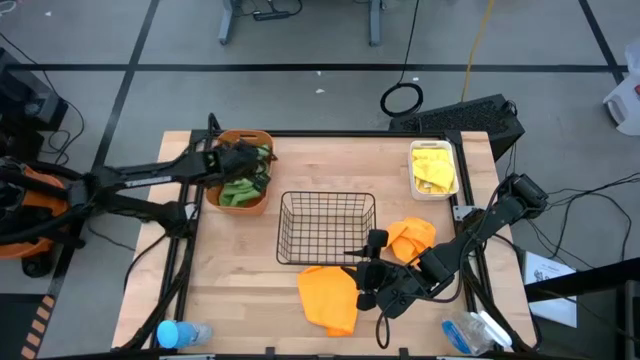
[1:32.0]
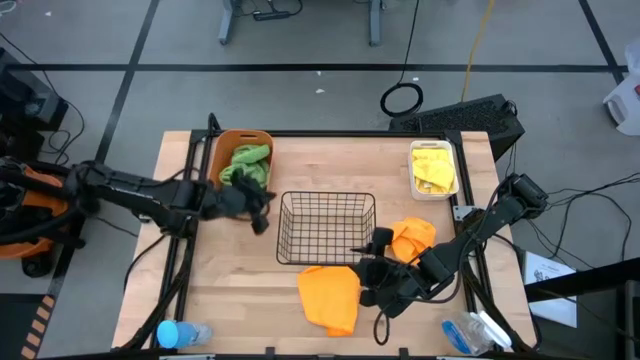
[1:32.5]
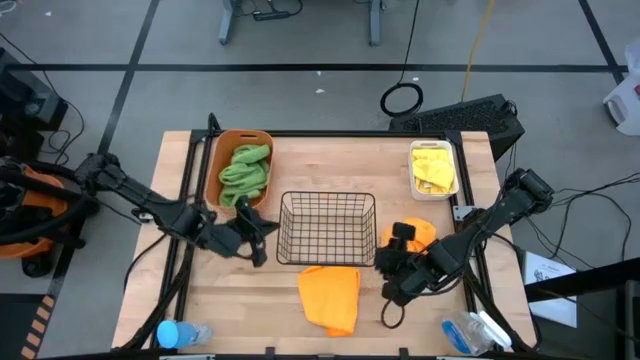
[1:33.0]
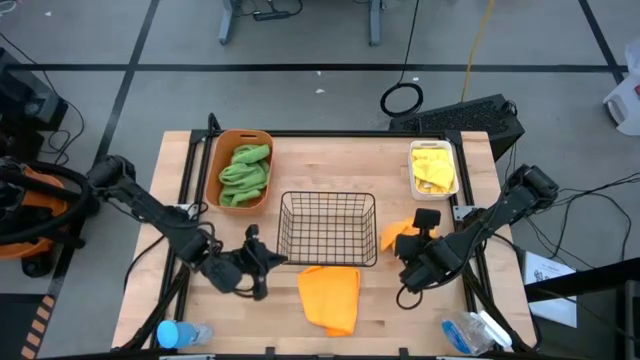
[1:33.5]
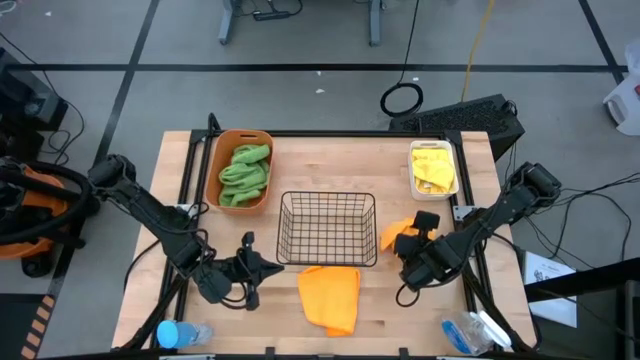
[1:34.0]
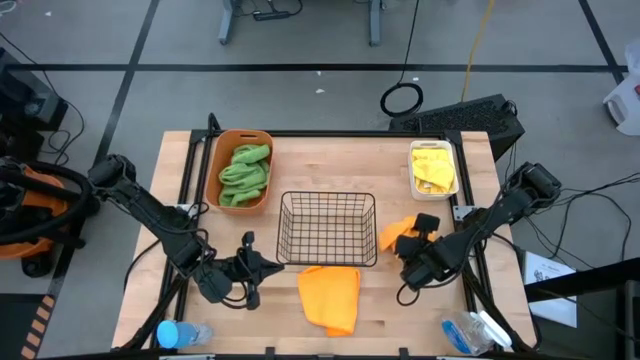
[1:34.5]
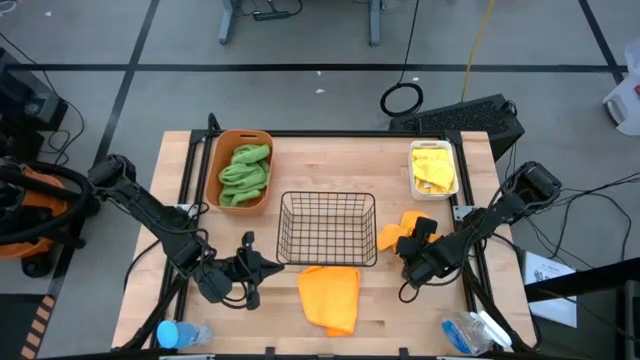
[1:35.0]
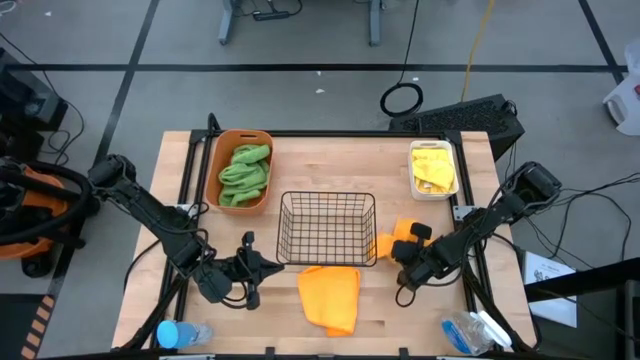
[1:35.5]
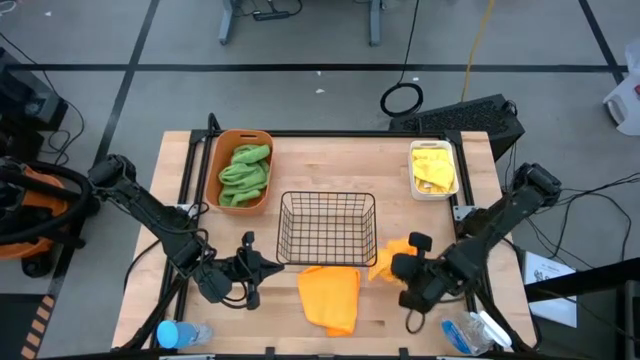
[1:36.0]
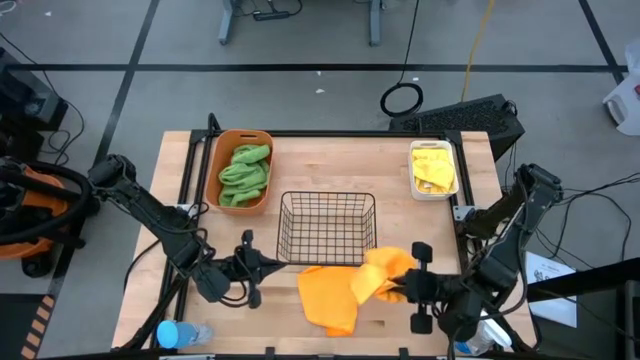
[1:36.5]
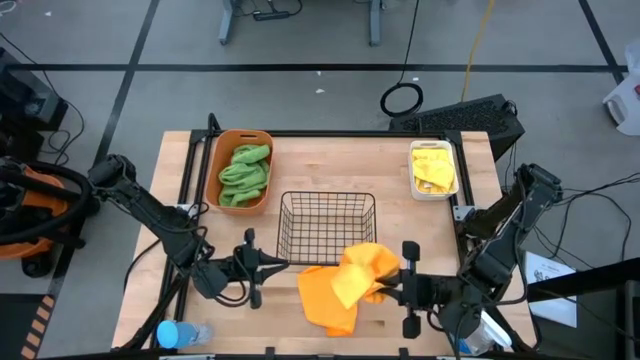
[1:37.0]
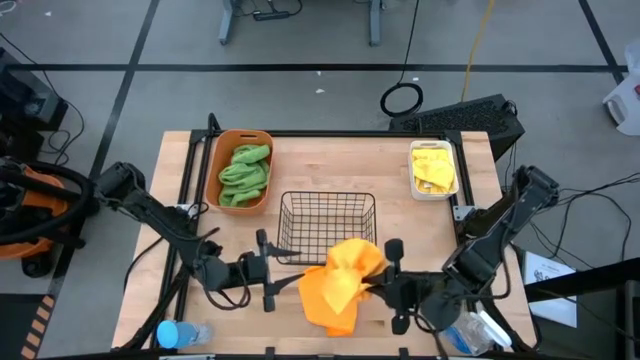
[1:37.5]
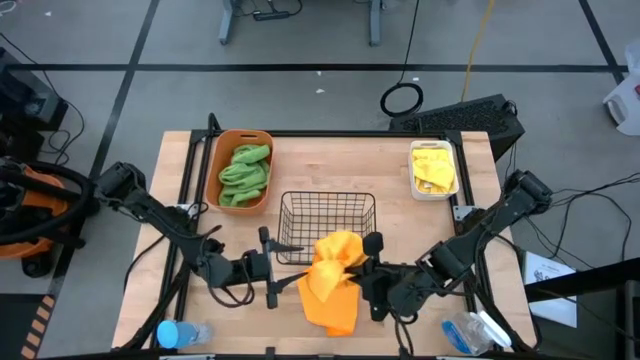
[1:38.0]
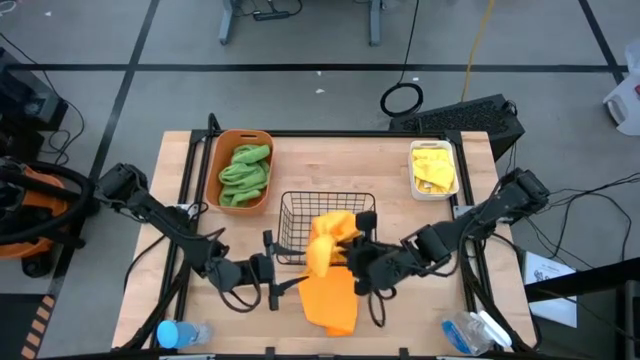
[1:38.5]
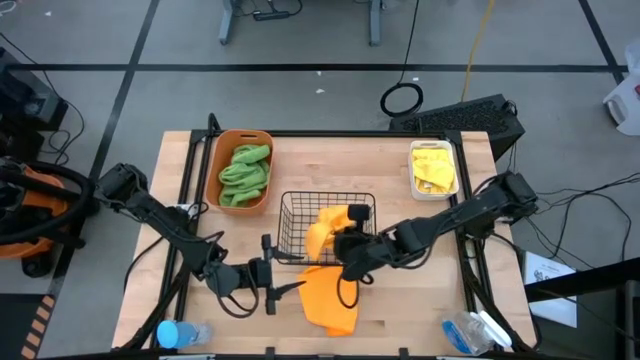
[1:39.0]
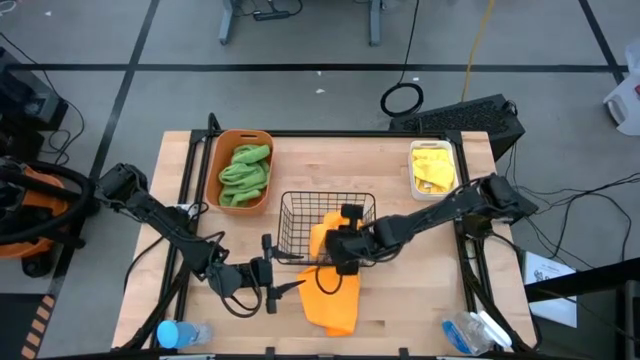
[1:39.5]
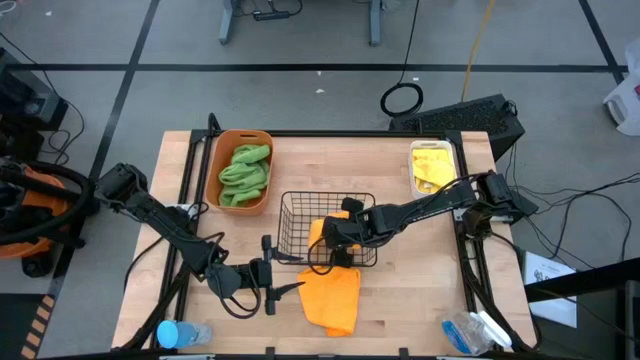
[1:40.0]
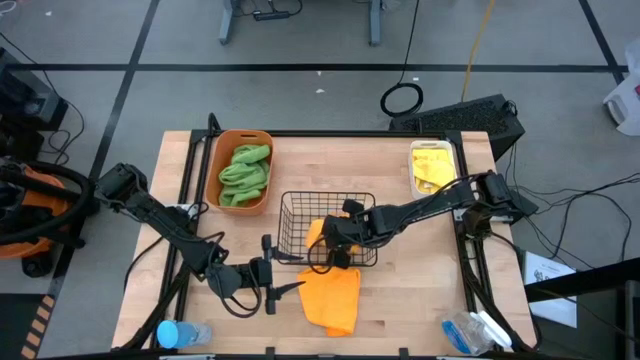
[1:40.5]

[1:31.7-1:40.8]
Task: Sort microfiber towel by color & place in baskets
Put the top orange microfiber towel into the black wire basket

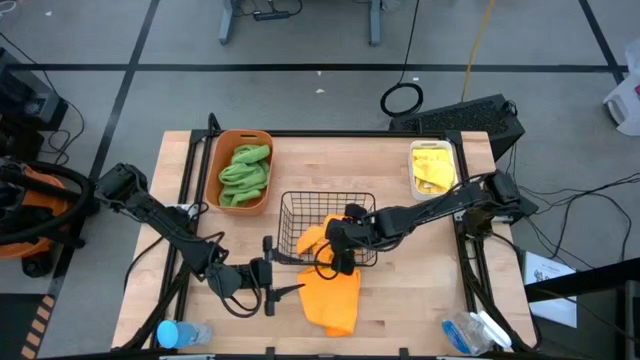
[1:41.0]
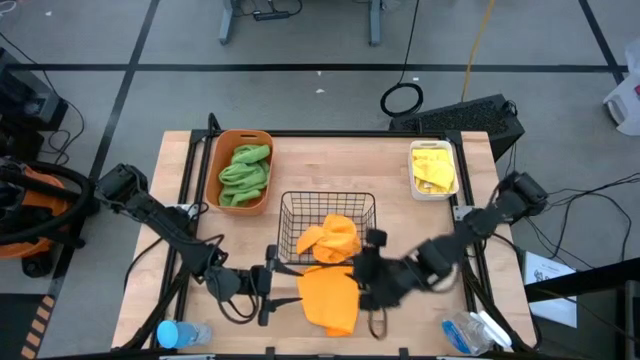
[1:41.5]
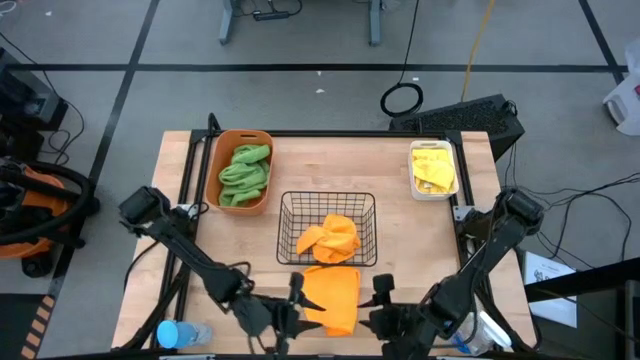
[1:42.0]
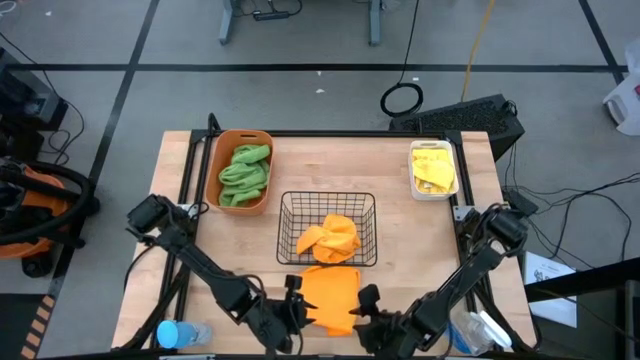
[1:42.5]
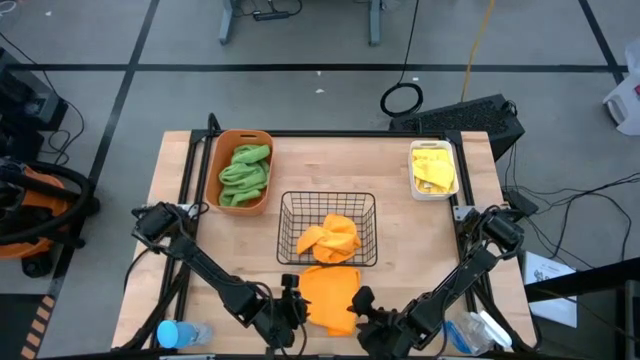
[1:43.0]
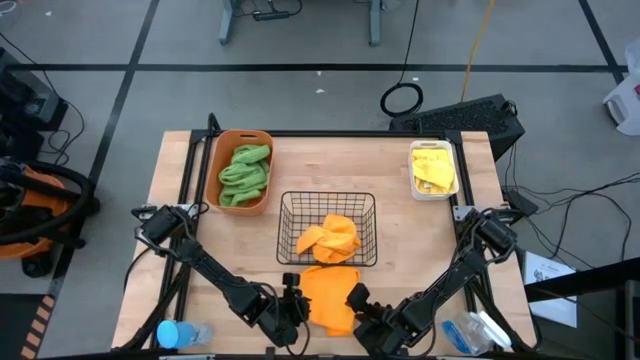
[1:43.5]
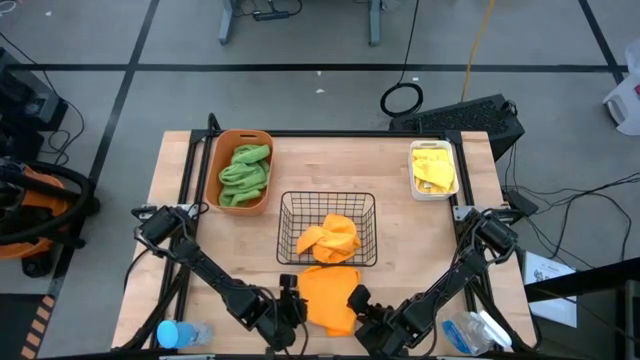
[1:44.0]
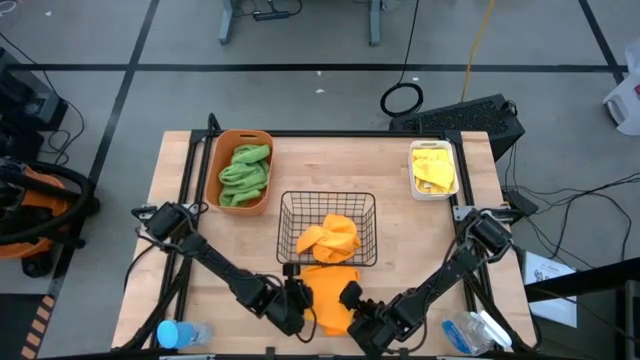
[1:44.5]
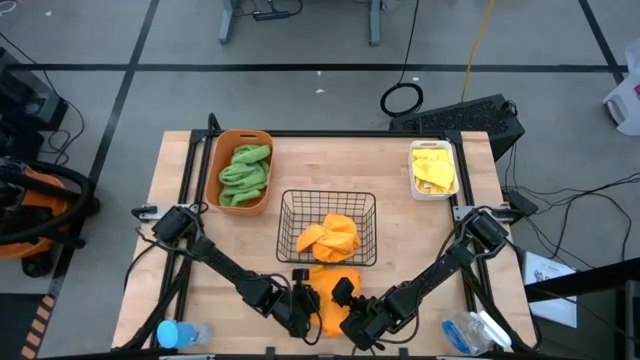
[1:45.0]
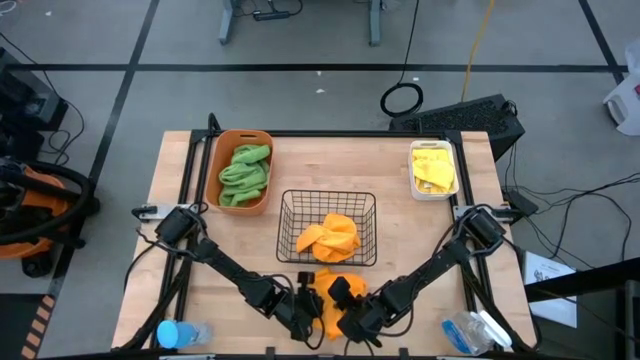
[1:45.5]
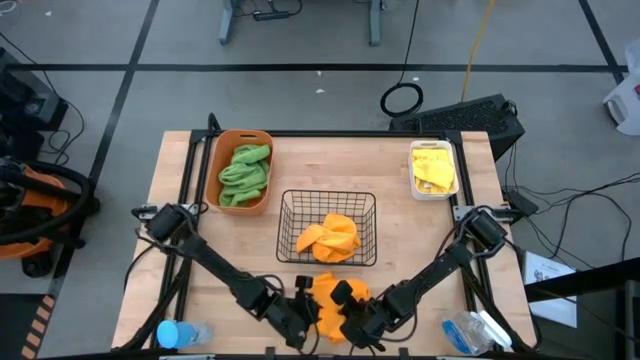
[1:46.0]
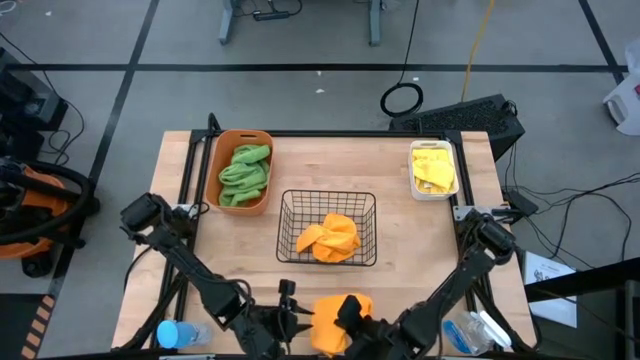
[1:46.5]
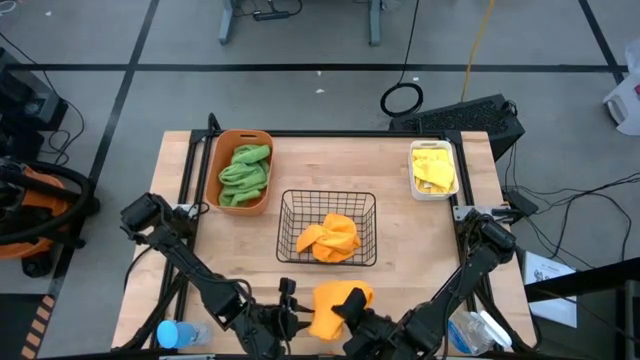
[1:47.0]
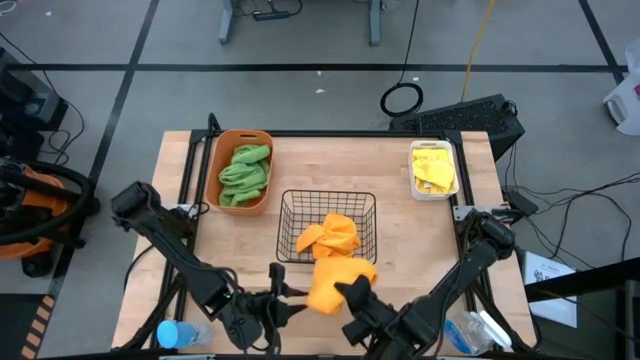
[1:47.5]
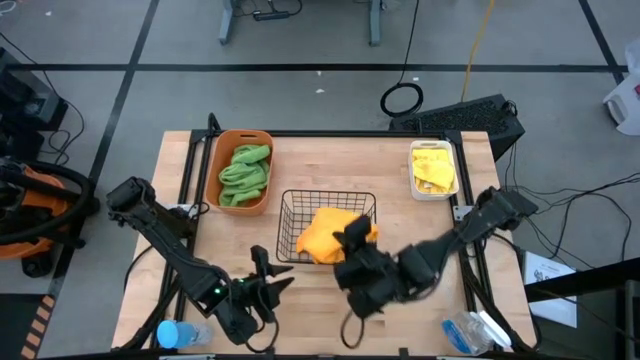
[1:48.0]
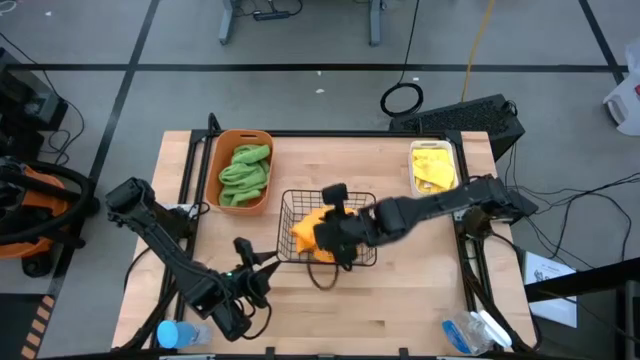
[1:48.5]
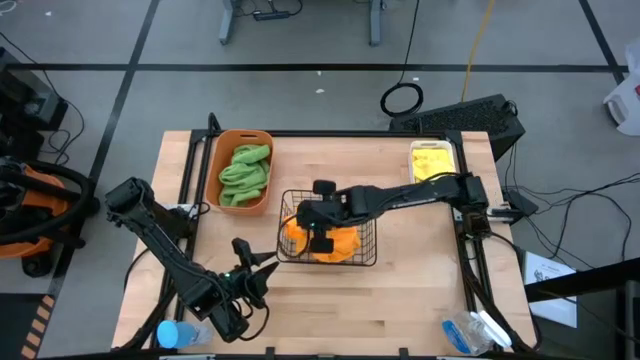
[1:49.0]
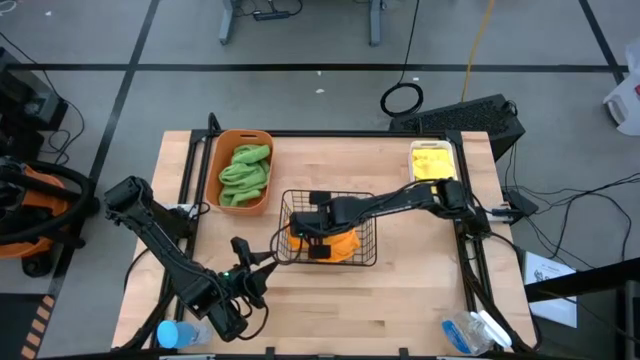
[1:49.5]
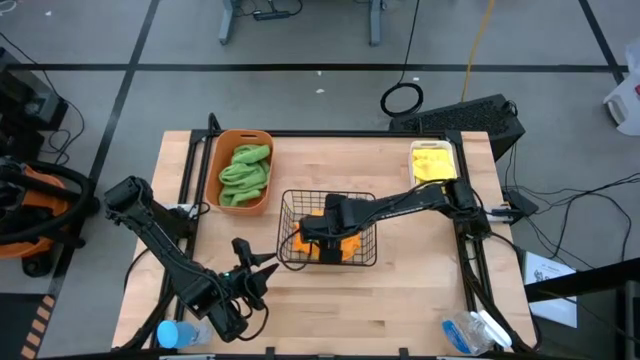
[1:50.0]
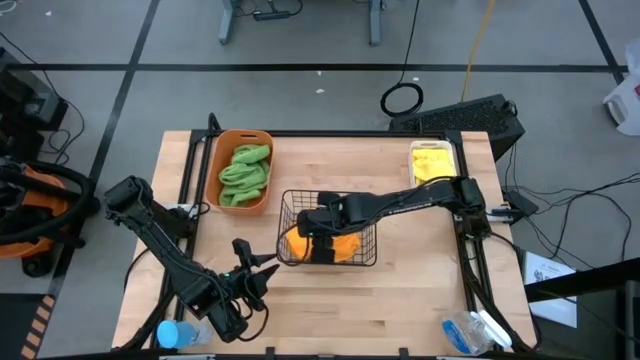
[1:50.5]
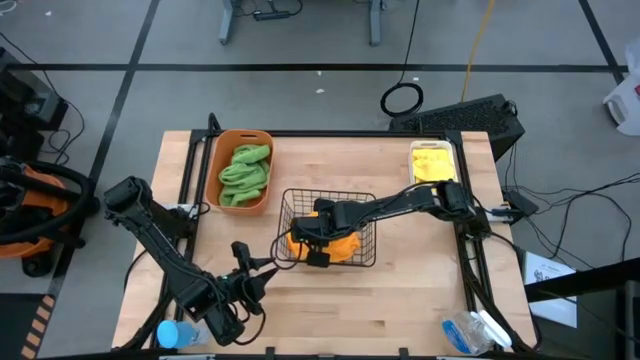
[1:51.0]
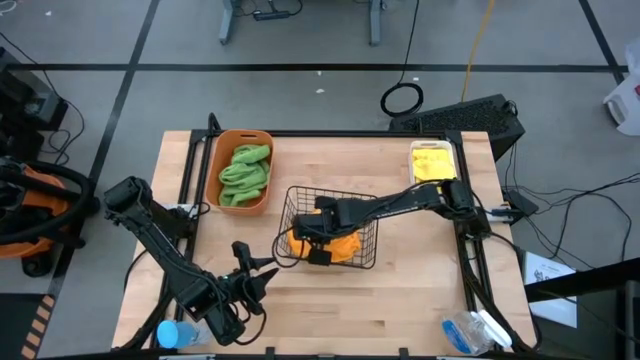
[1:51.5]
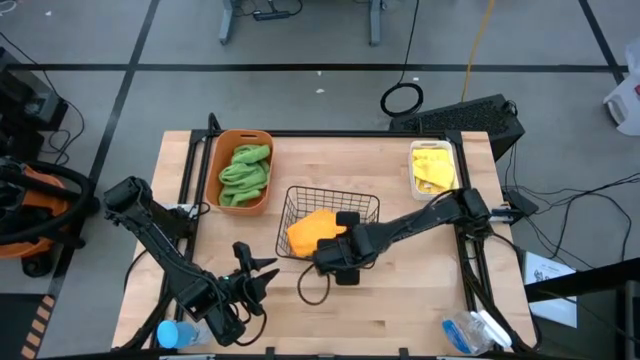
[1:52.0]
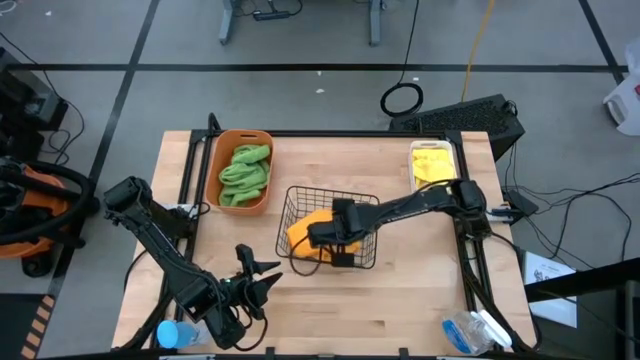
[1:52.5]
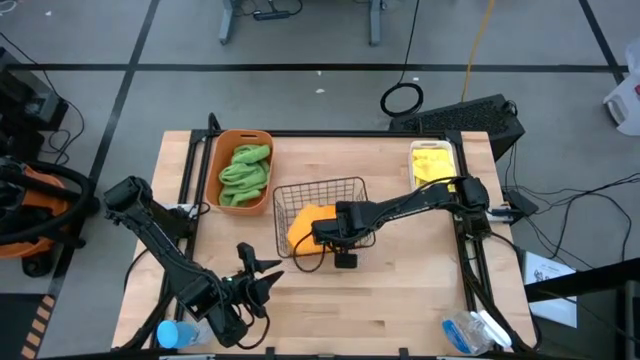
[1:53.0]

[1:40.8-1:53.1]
Put the orange microfiber towel into the black wire basket
